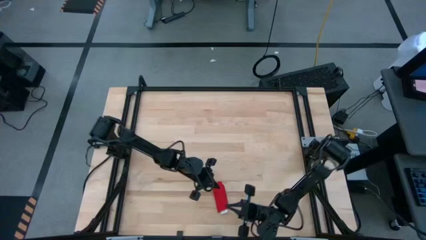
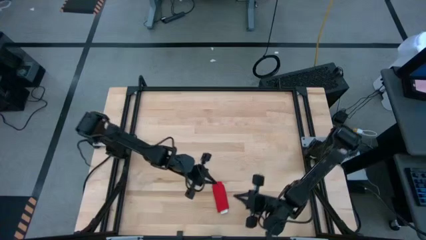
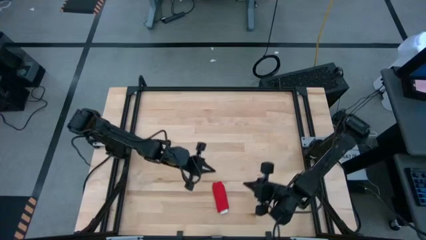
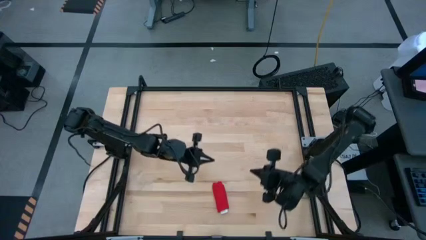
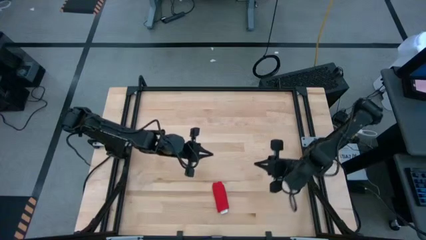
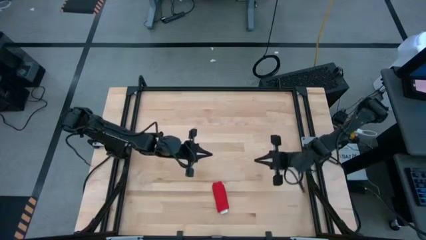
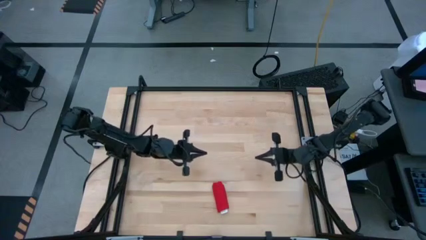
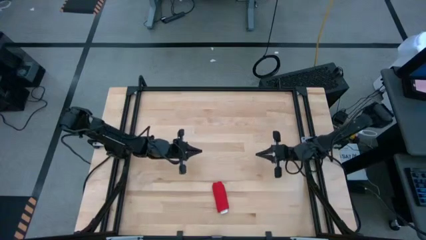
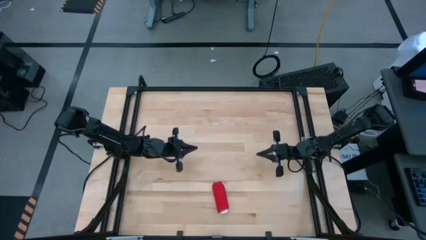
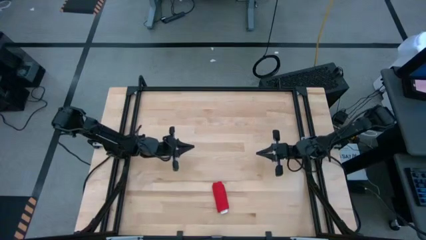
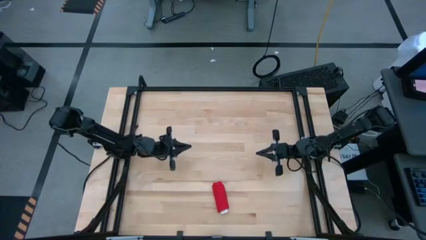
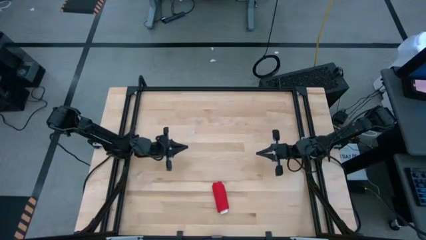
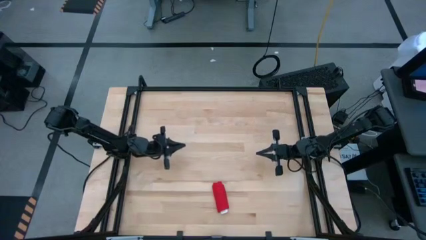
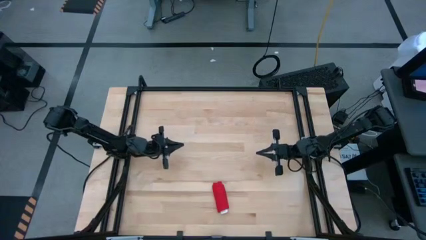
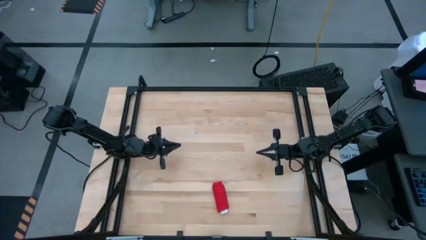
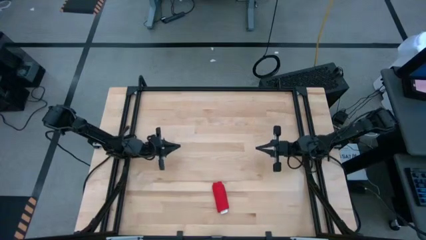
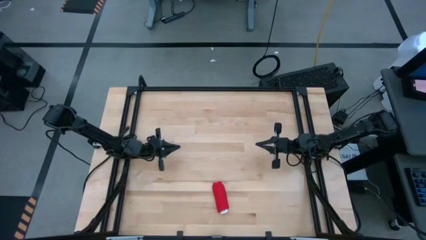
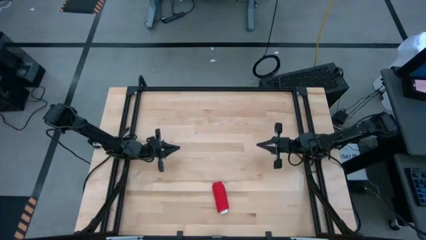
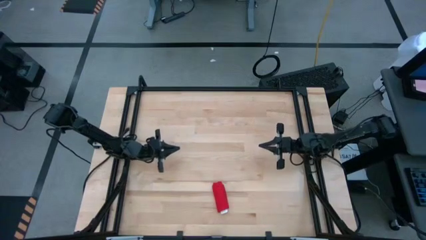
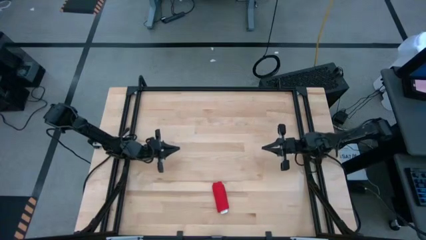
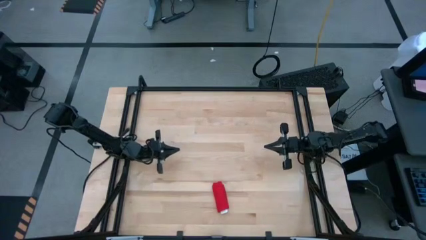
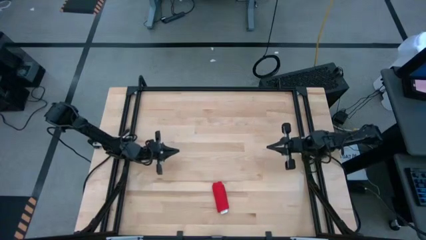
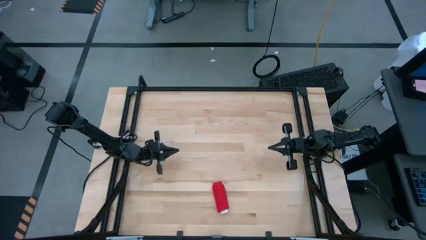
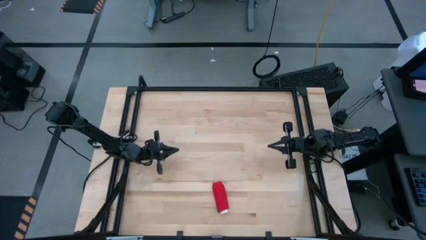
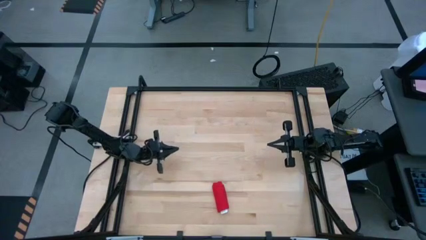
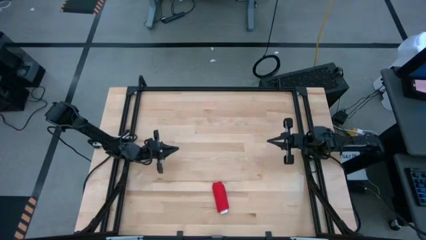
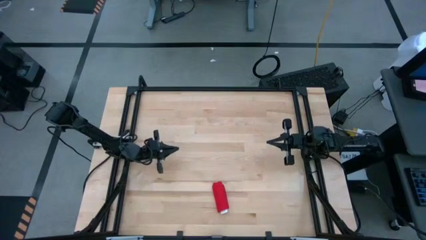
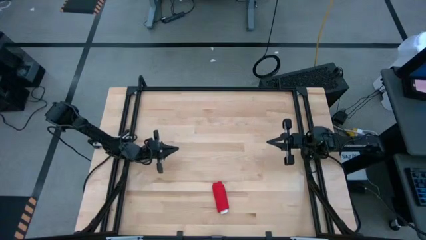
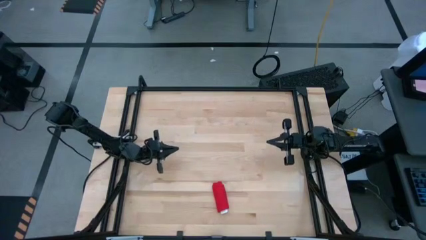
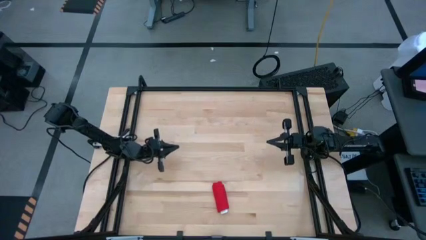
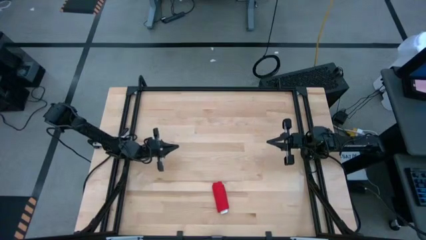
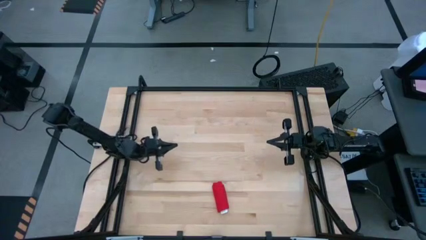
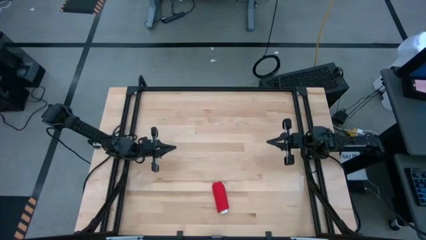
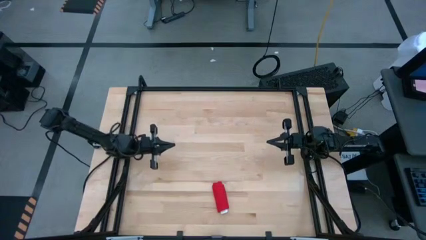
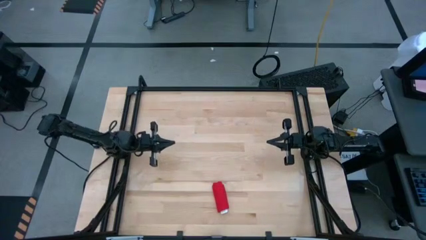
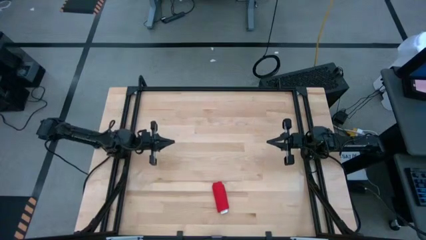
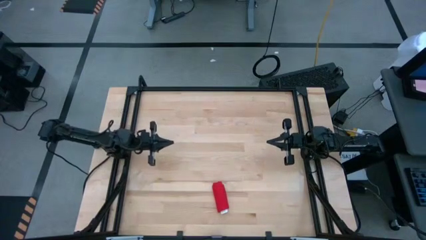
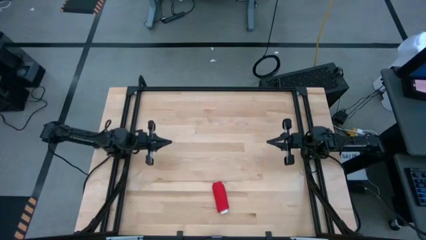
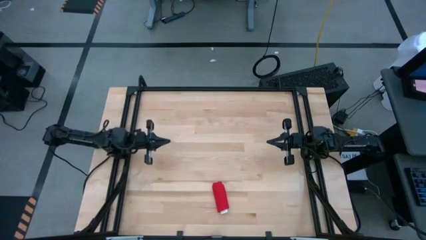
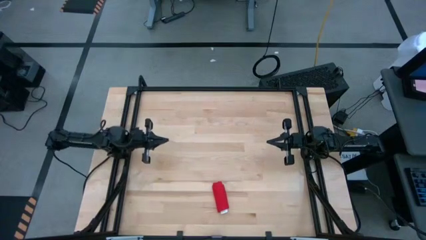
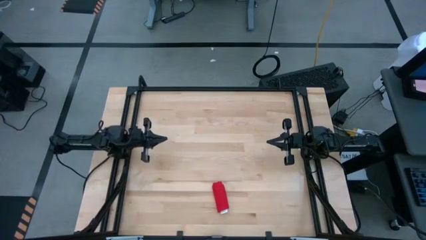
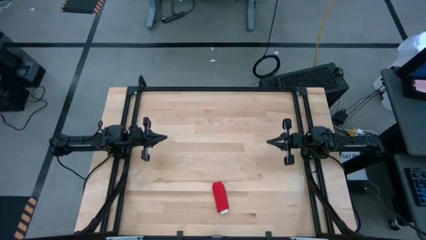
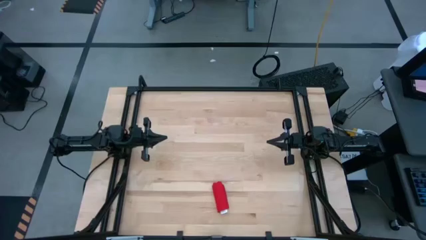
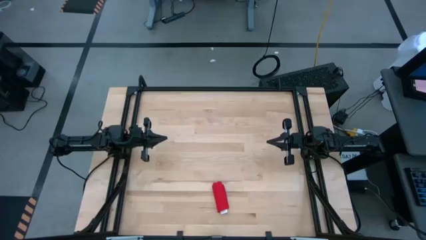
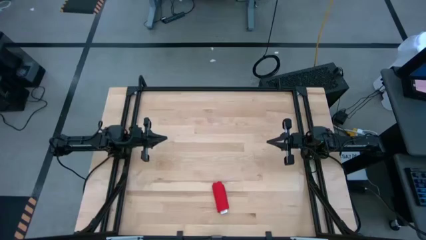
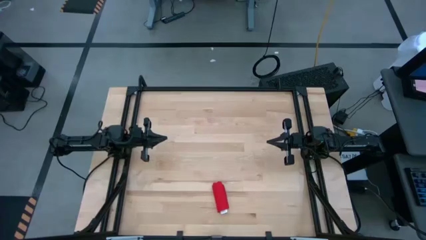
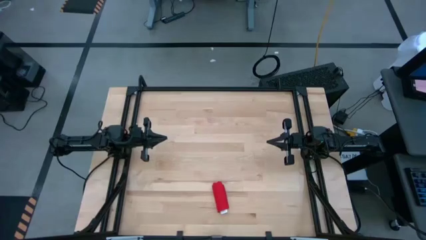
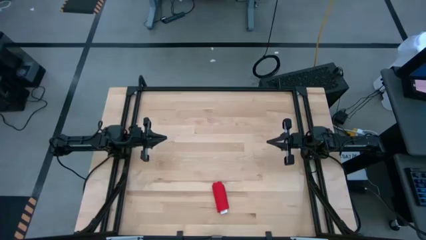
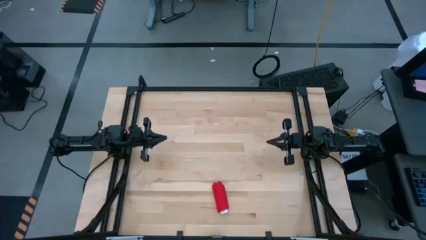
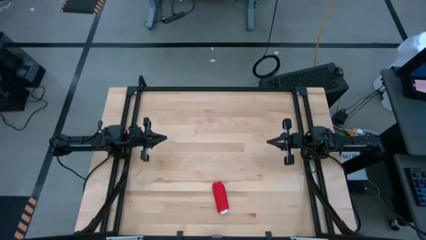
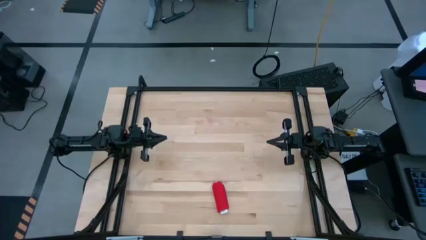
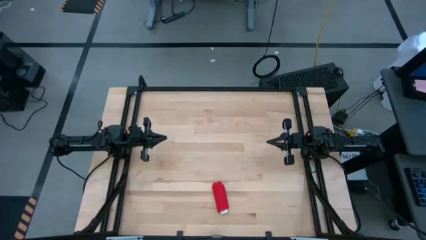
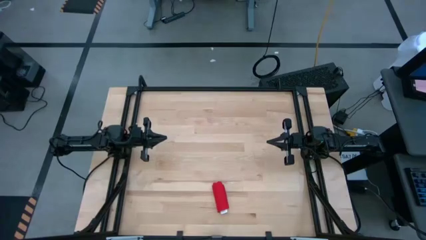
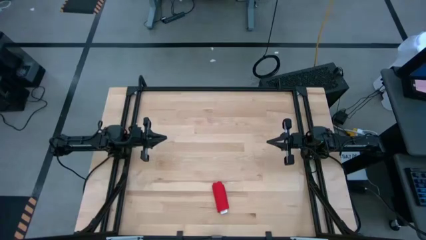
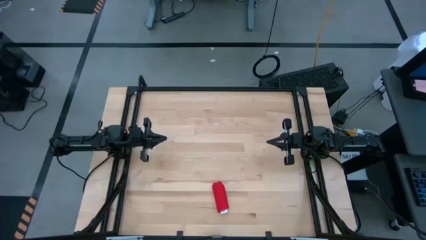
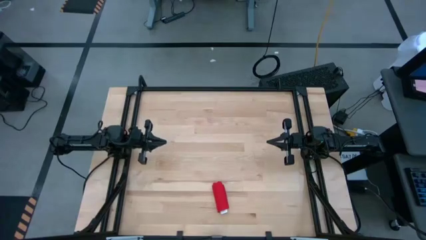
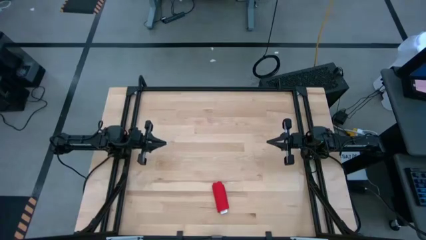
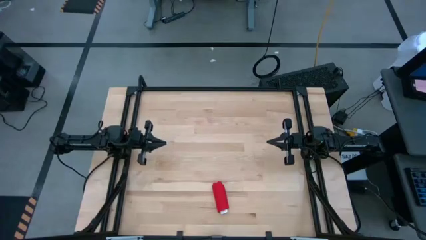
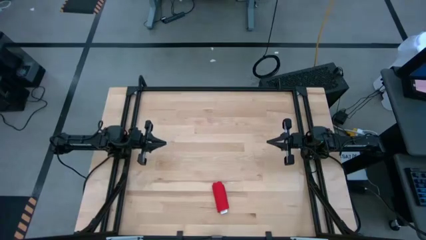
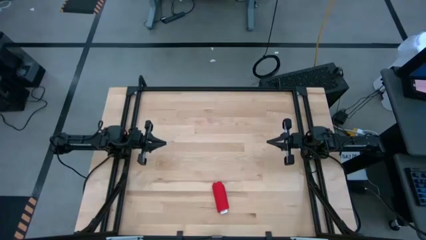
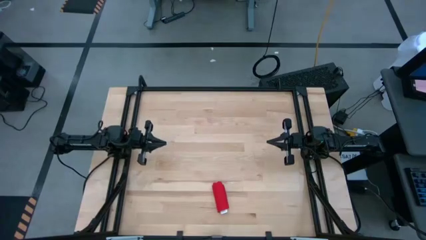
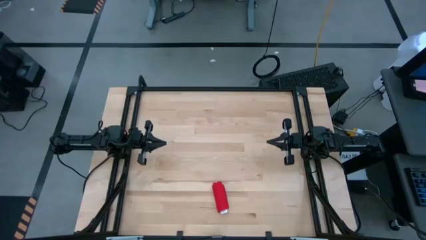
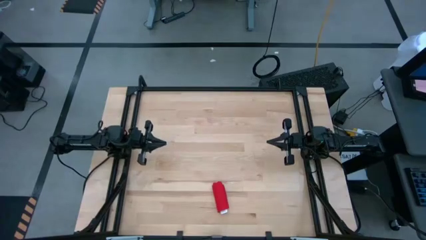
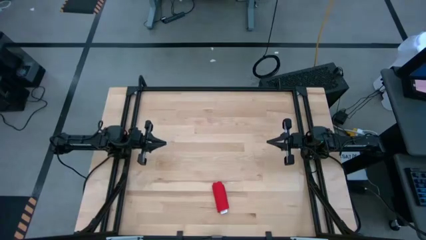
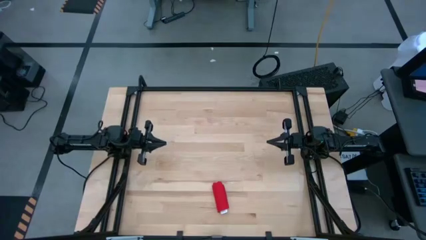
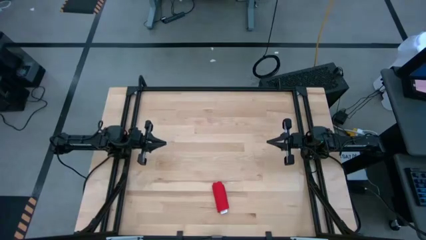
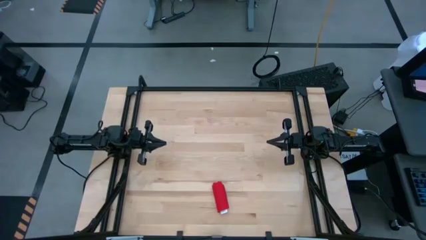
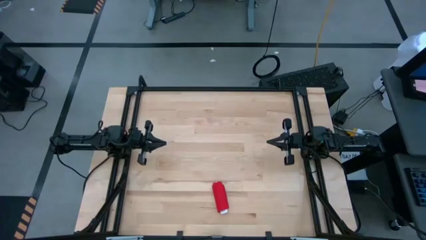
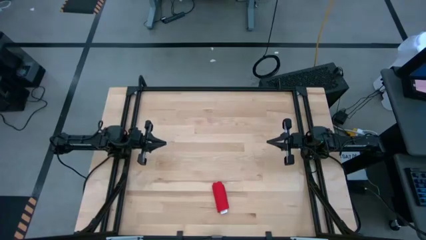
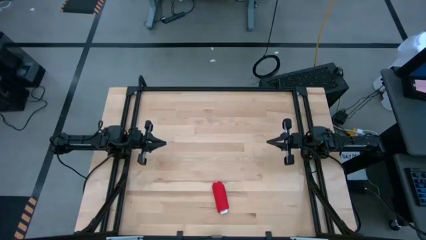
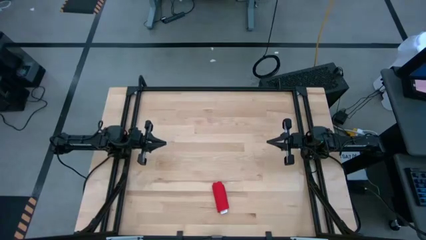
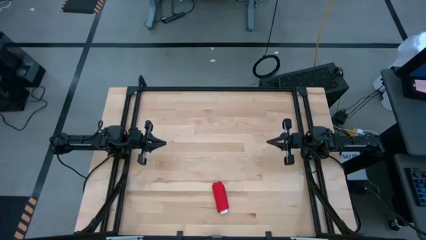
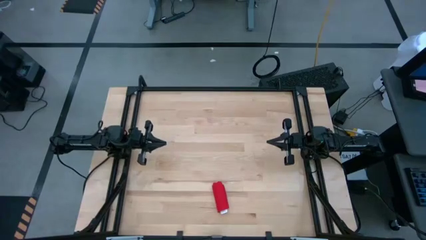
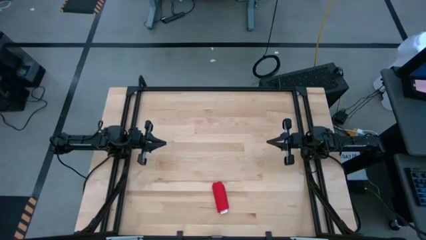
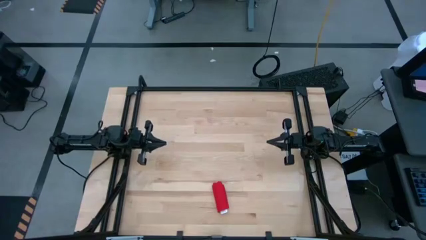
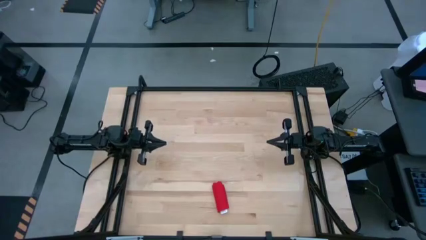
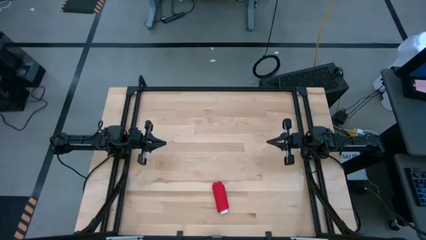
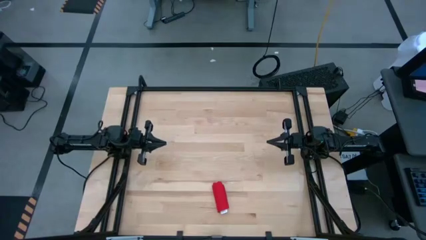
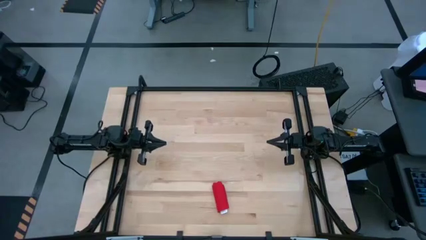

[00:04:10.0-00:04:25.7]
Task: Roll napkin
Return to Home Position
